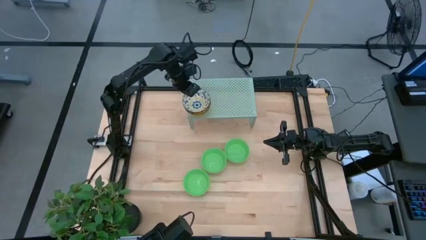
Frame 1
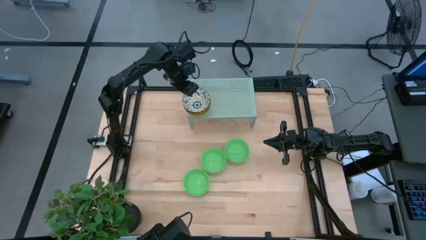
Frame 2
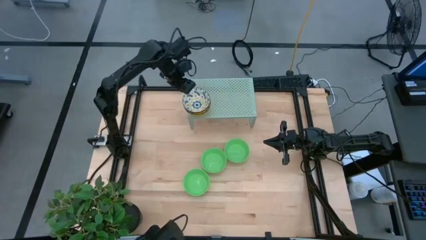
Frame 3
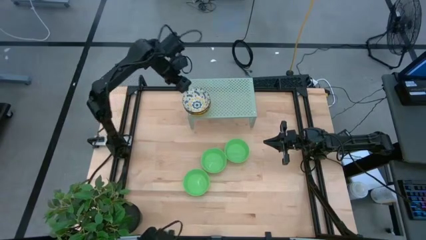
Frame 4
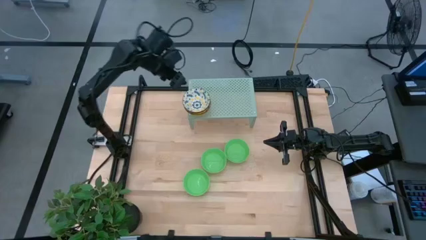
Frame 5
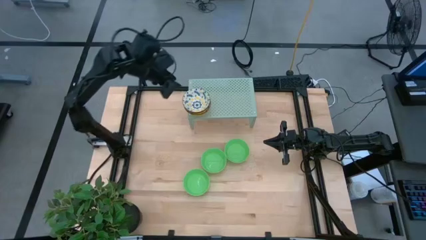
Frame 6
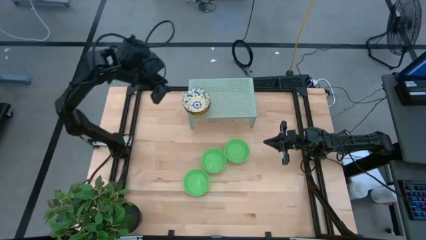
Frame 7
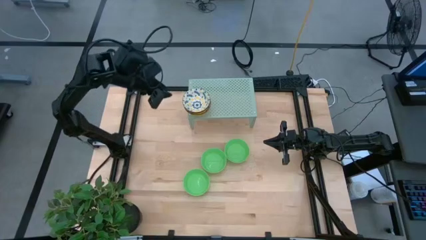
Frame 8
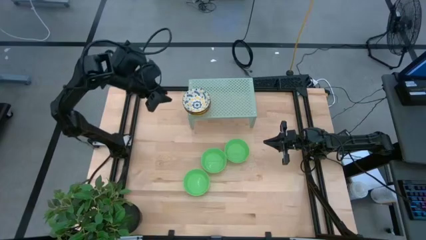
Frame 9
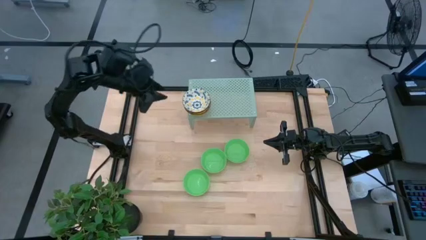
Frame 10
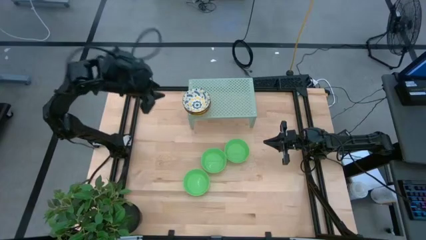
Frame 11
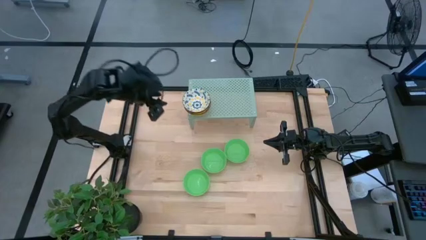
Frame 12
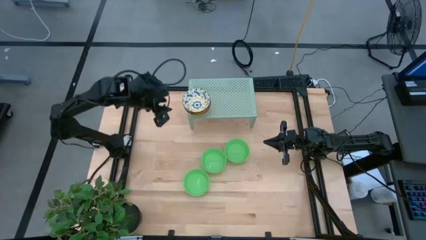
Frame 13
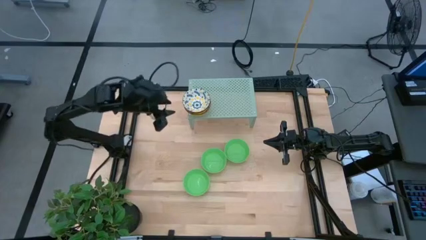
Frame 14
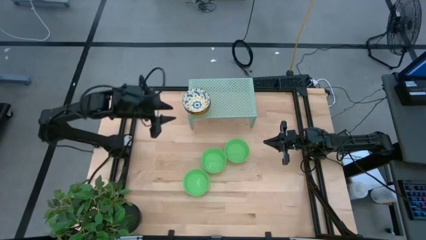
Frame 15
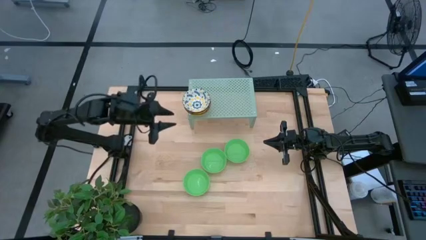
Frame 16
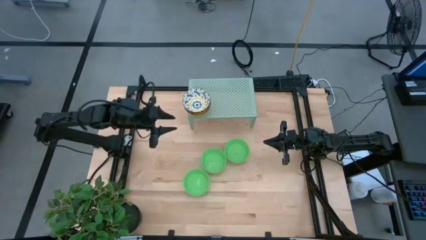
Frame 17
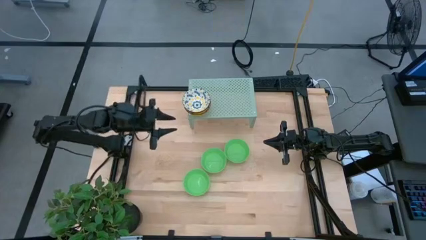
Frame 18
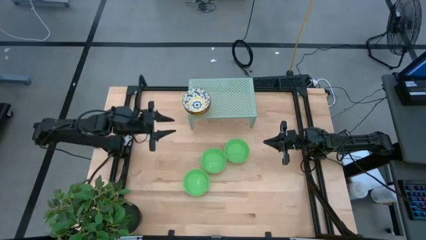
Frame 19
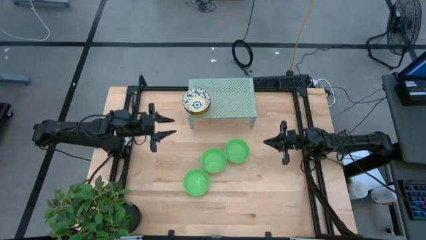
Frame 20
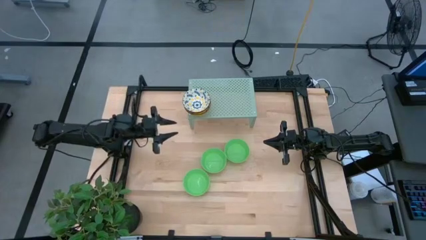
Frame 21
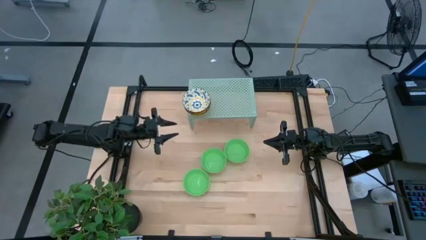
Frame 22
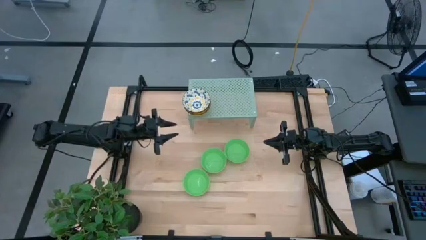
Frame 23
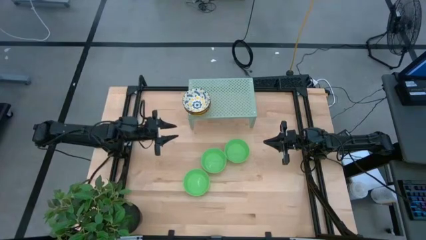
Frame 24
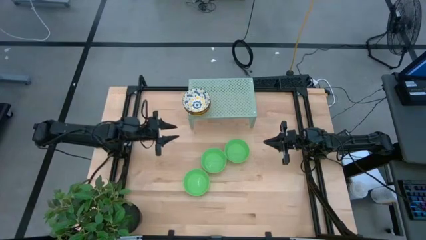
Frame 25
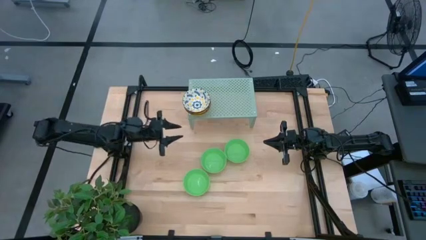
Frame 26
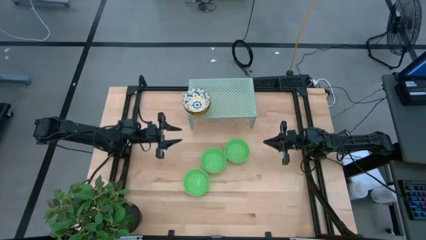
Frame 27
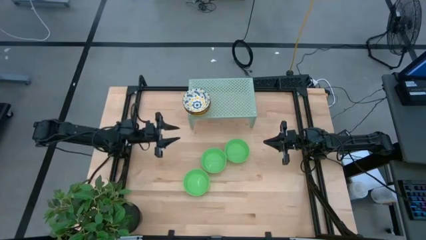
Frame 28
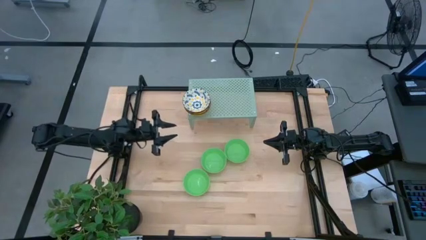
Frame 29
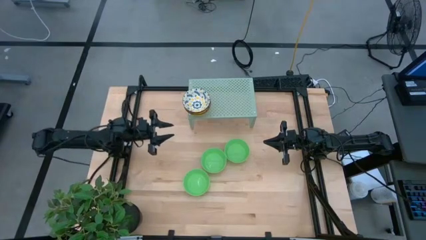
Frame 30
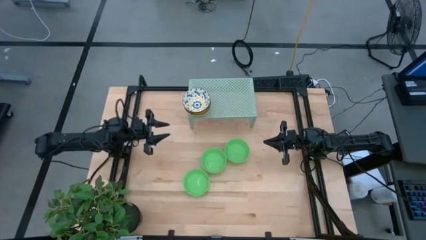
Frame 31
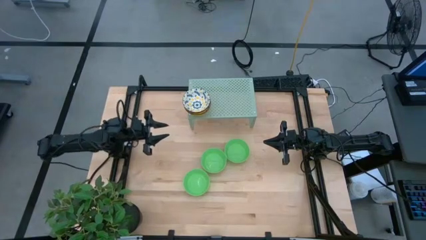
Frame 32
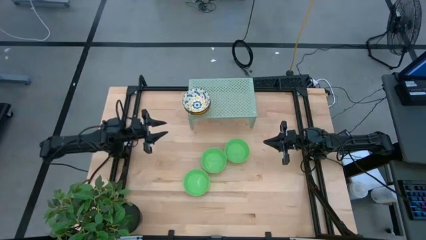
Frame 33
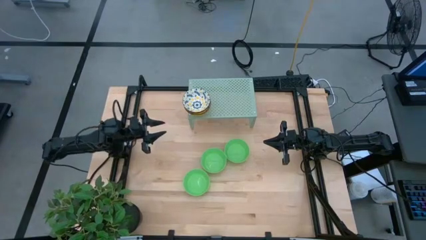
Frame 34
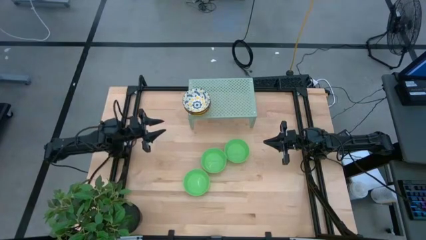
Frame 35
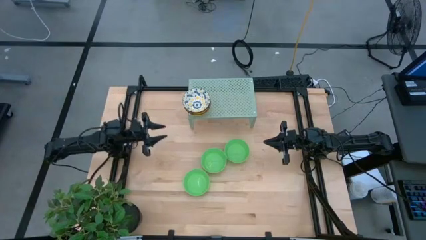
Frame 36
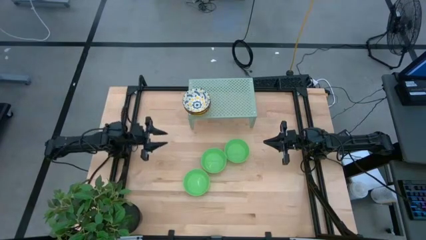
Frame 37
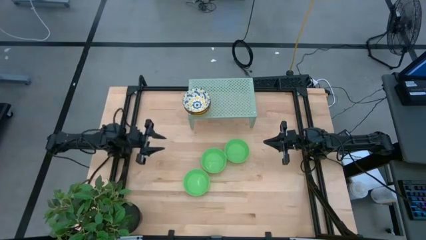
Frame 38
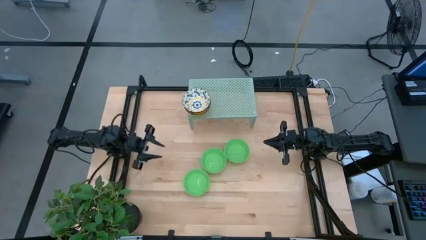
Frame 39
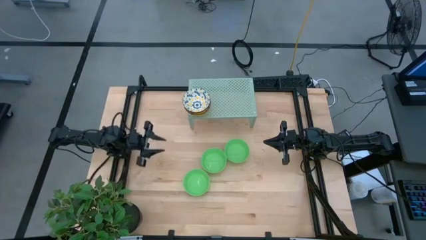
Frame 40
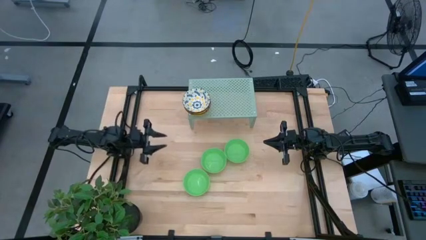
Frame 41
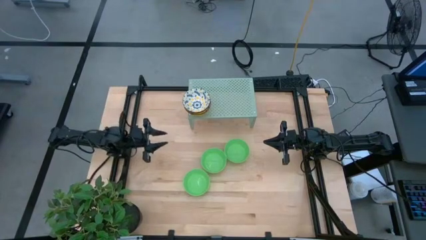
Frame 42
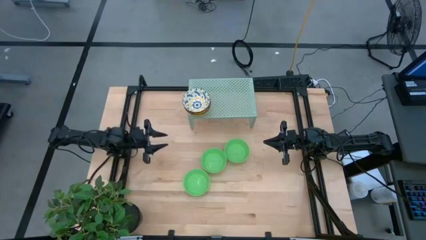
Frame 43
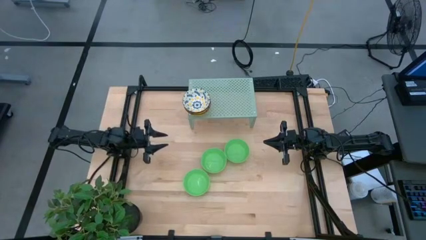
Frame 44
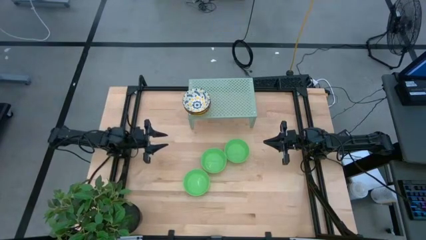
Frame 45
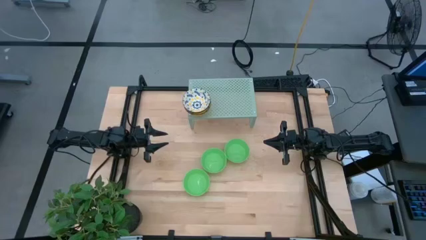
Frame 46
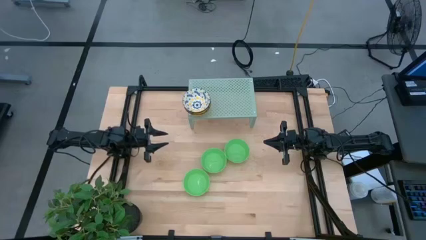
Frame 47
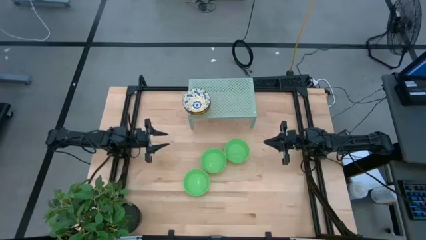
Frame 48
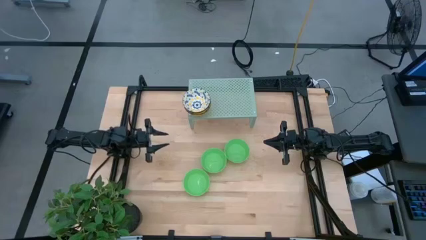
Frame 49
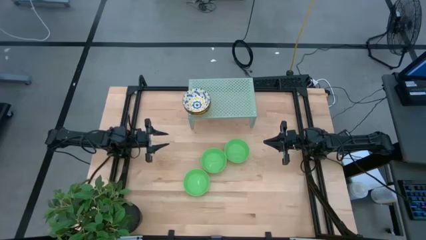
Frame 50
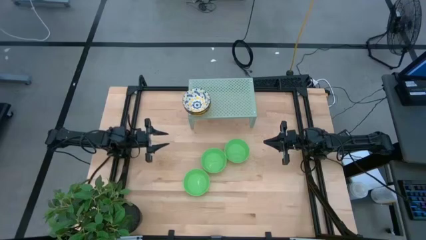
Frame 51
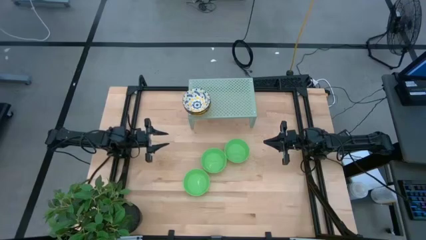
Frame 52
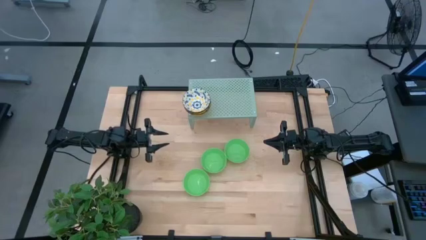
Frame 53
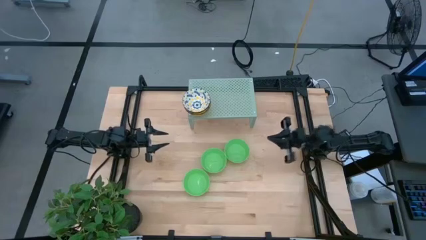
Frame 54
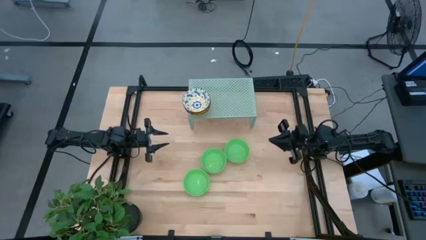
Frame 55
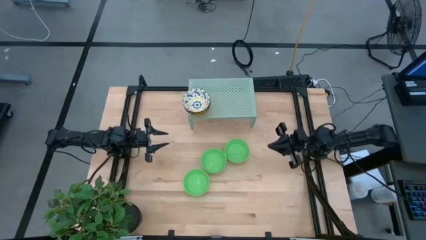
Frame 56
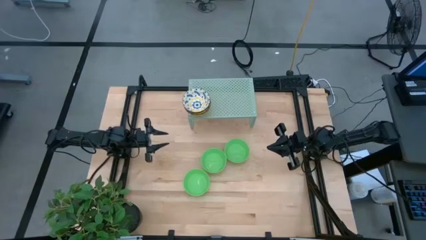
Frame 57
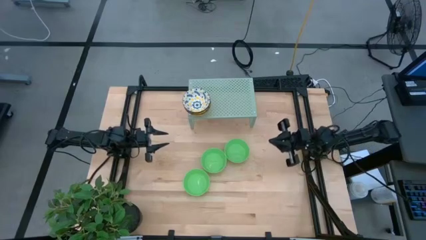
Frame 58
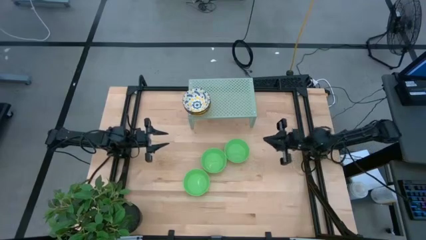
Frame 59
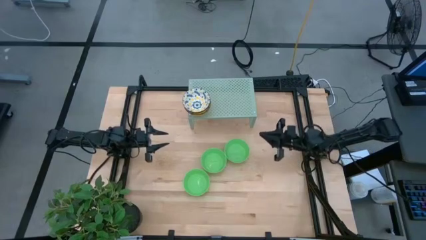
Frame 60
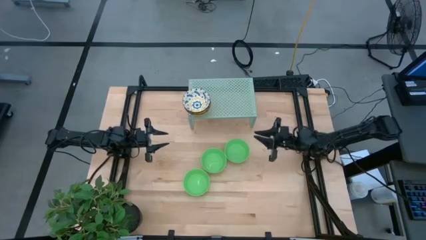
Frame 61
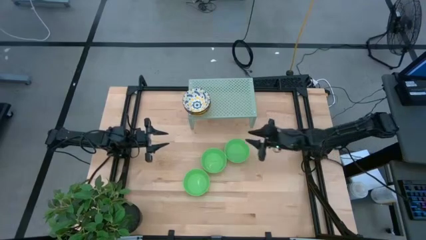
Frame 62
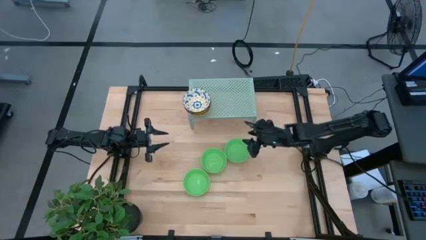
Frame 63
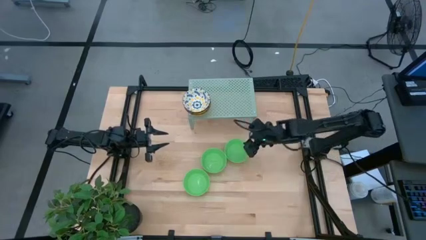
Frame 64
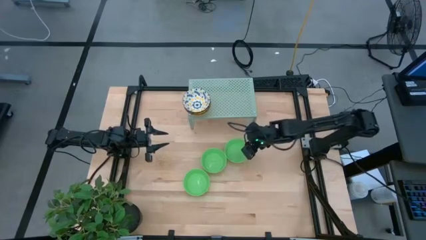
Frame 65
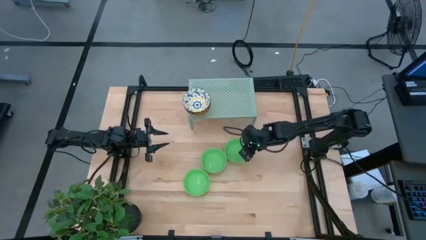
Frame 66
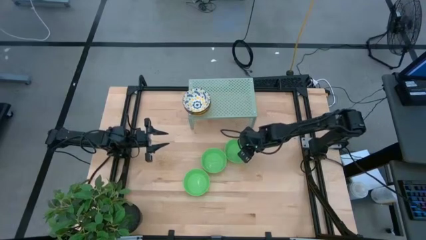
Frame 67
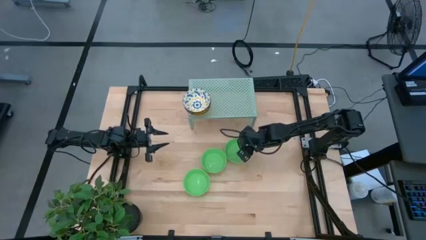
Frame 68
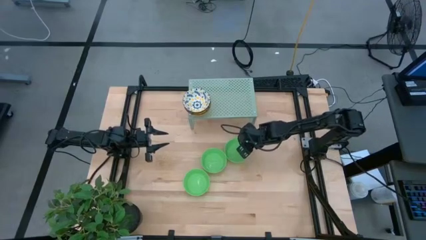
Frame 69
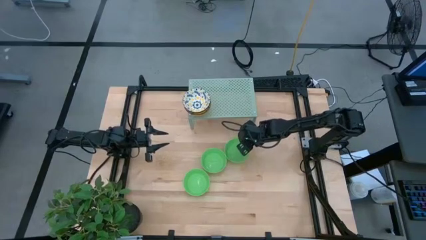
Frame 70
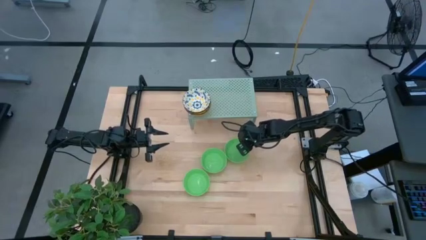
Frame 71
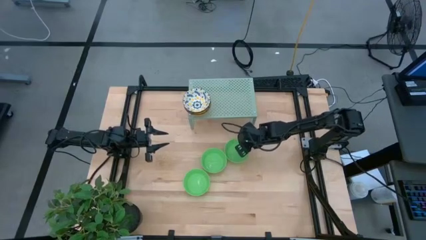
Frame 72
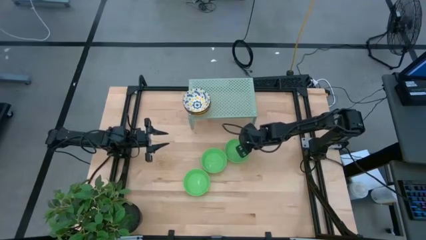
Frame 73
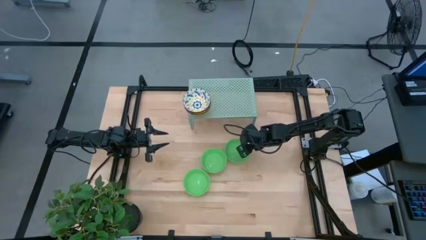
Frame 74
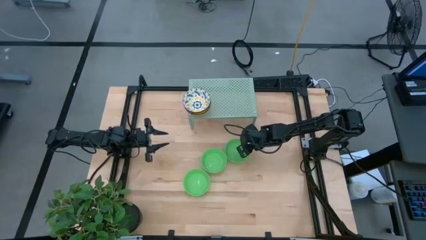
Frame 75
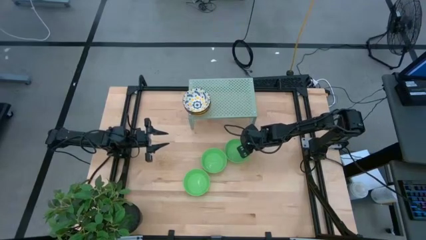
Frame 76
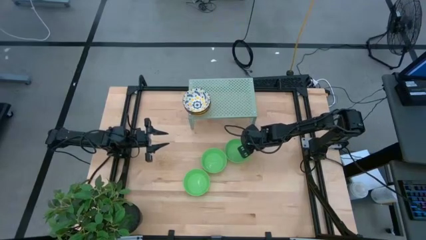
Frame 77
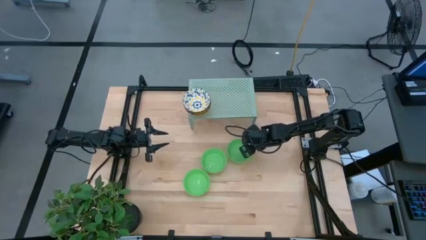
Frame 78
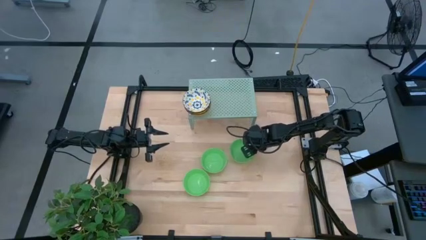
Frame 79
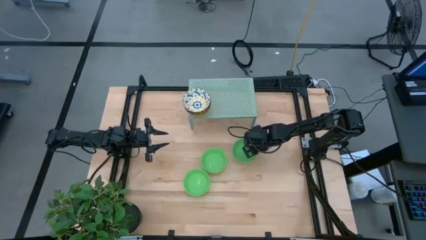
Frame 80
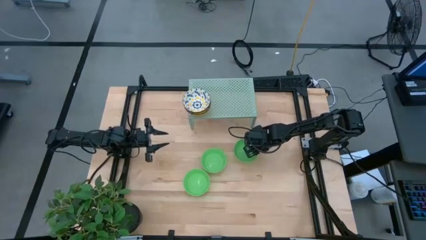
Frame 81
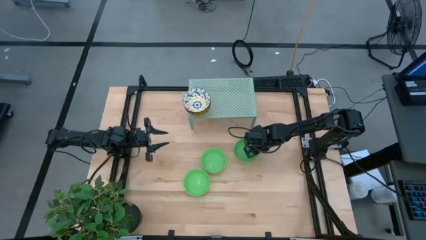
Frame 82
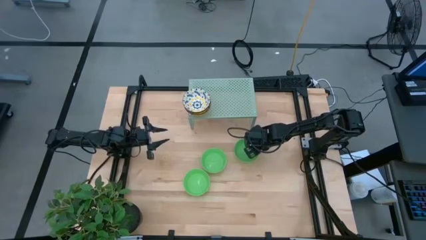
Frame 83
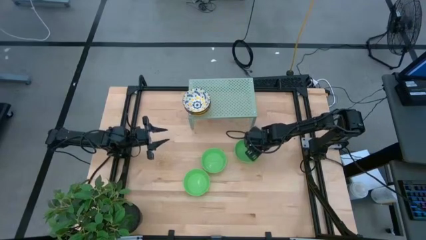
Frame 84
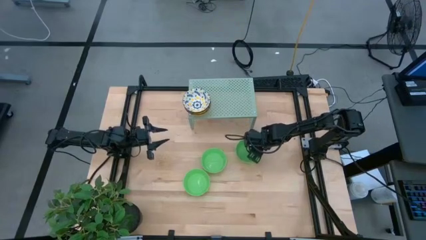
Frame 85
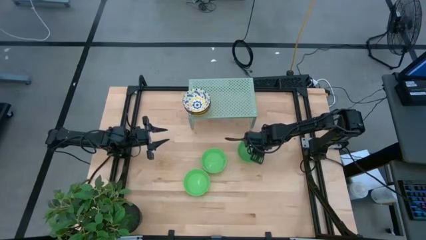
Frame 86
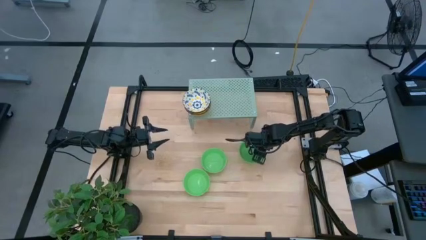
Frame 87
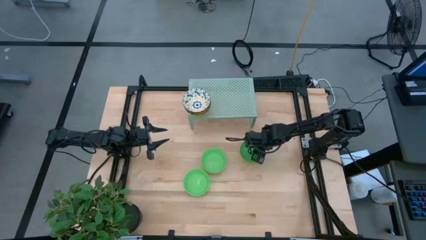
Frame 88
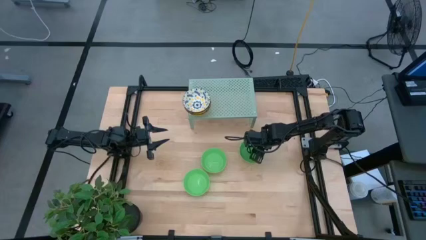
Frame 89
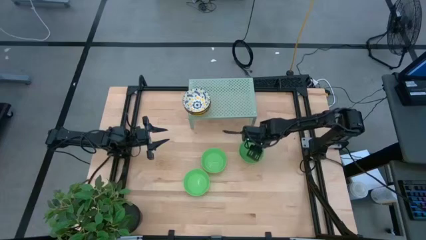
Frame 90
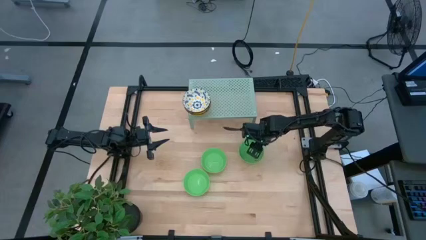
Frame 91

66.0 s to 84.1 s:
Task: Pick & Place Mini bowls
Put the top right green bowl on the shelf
